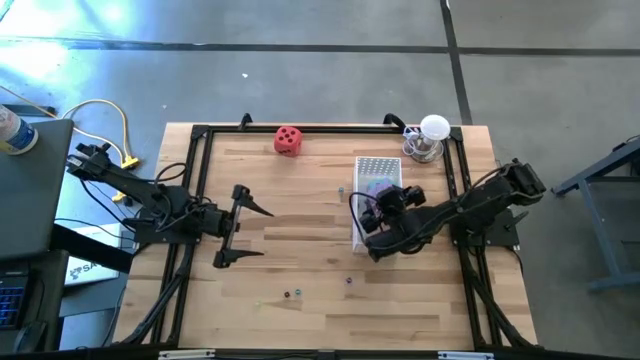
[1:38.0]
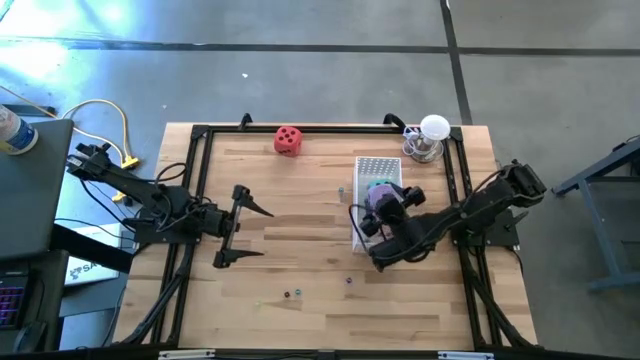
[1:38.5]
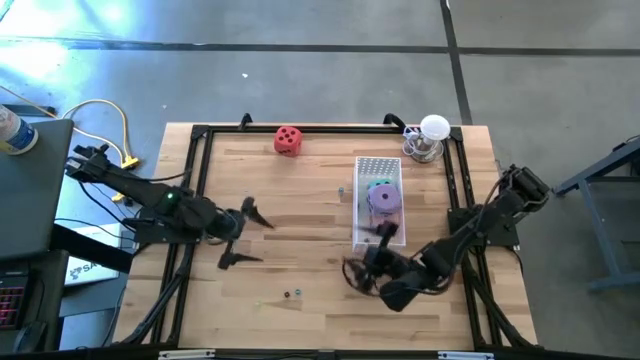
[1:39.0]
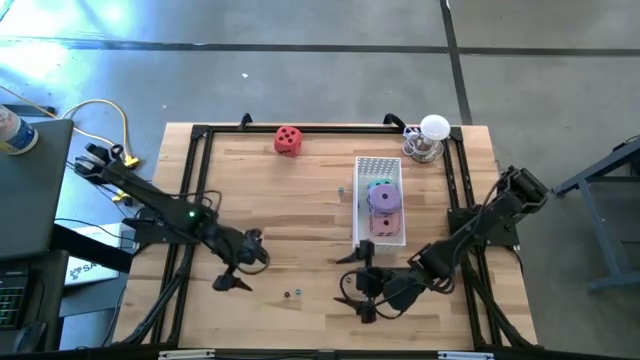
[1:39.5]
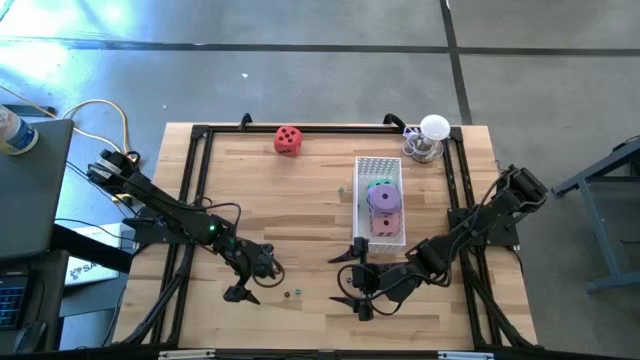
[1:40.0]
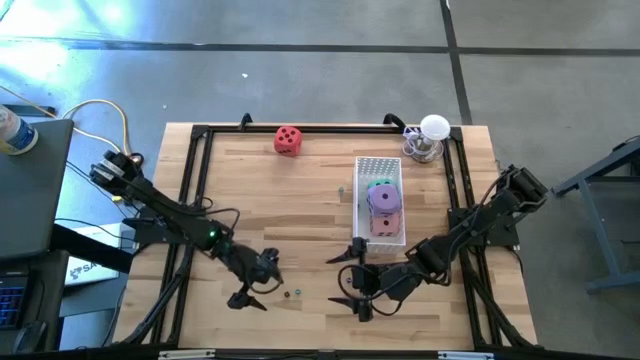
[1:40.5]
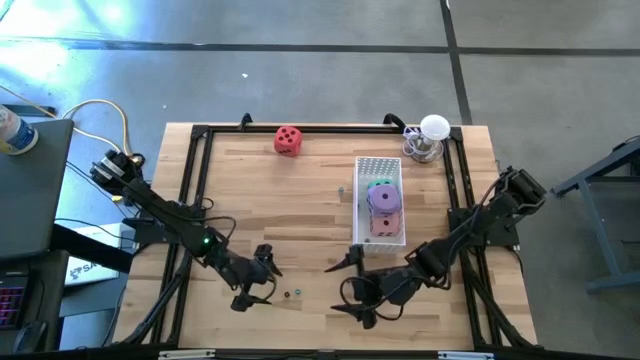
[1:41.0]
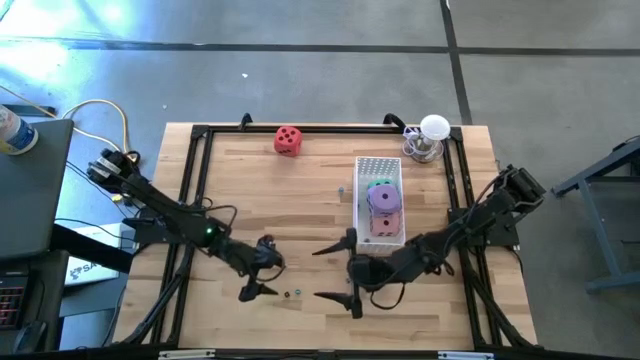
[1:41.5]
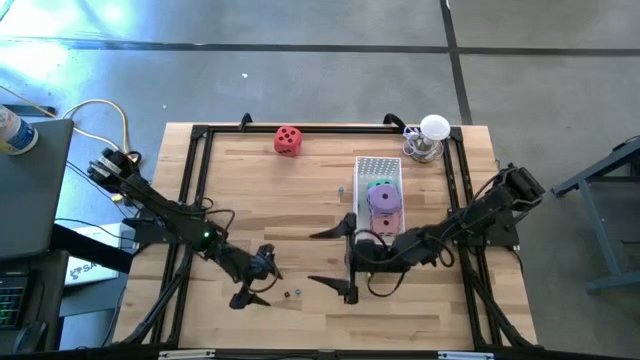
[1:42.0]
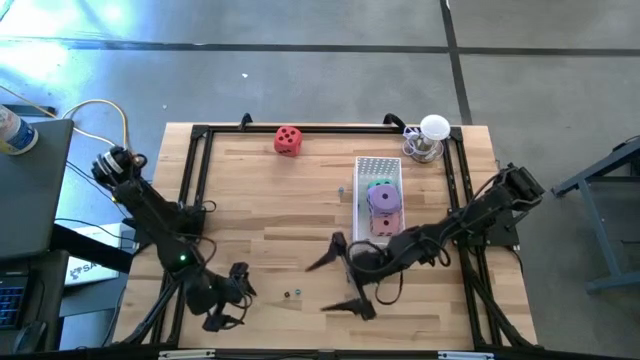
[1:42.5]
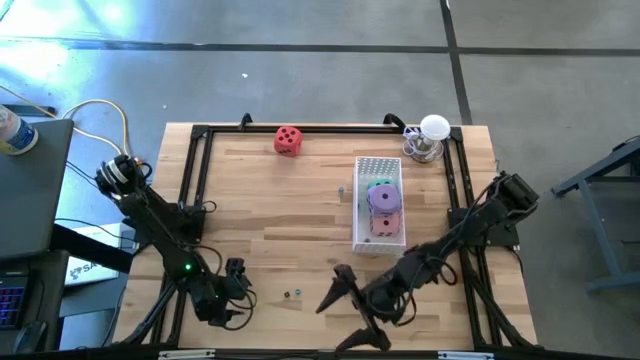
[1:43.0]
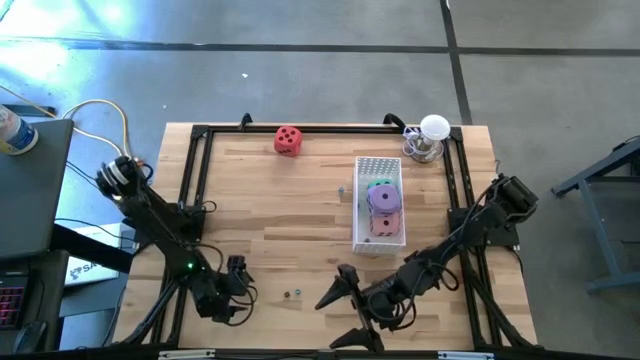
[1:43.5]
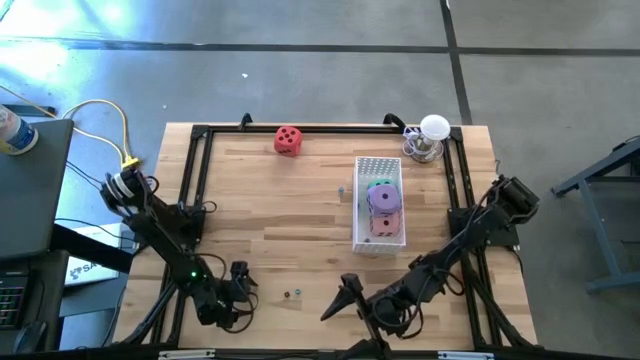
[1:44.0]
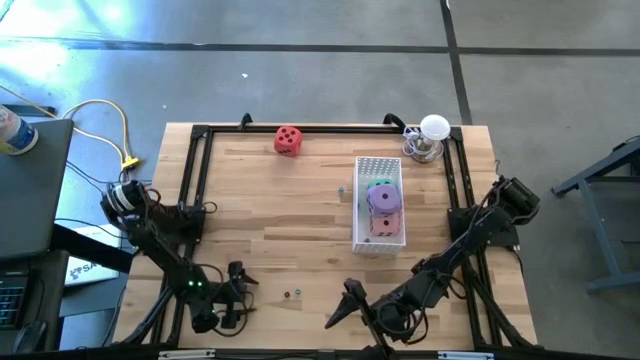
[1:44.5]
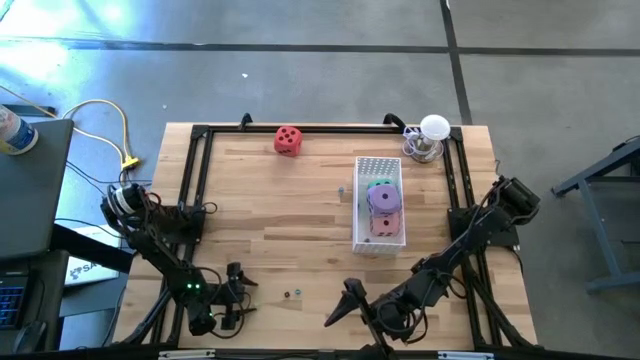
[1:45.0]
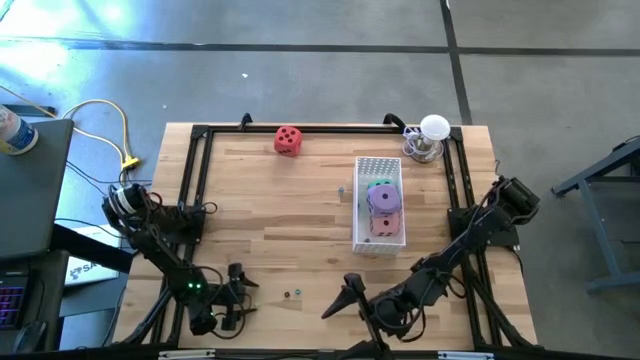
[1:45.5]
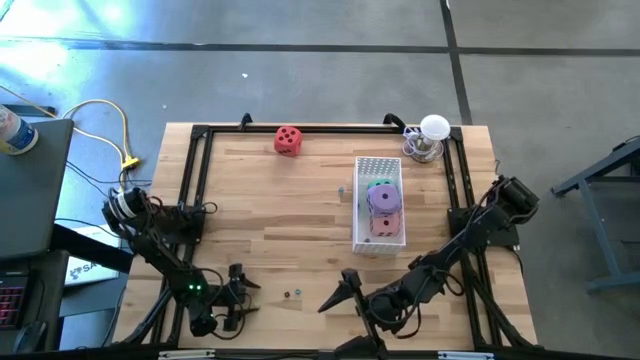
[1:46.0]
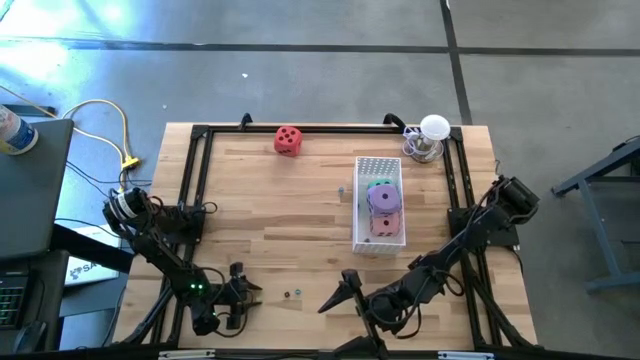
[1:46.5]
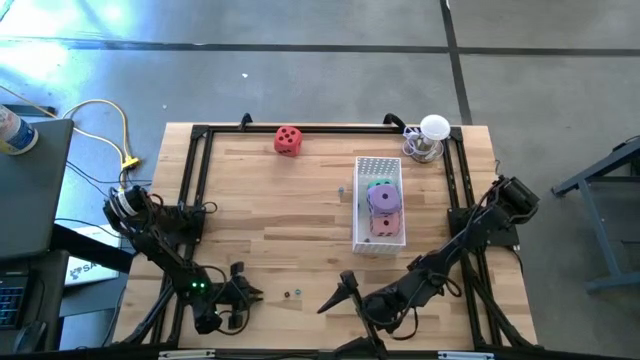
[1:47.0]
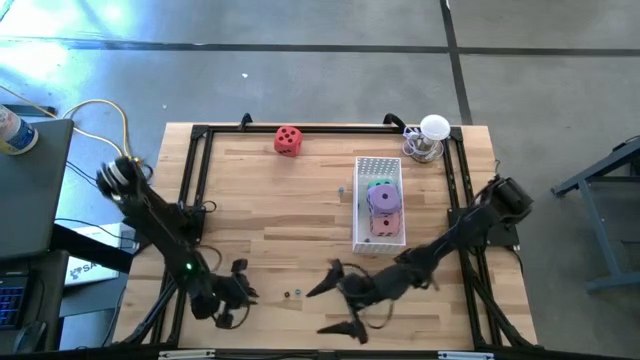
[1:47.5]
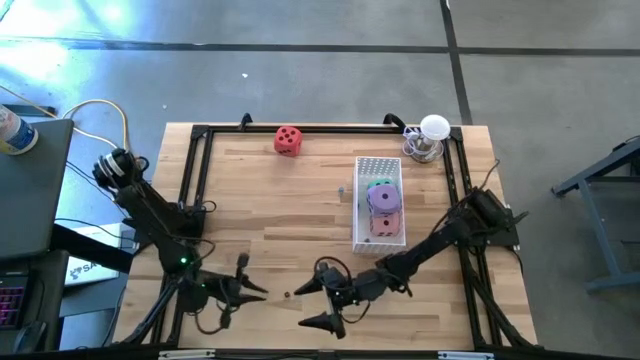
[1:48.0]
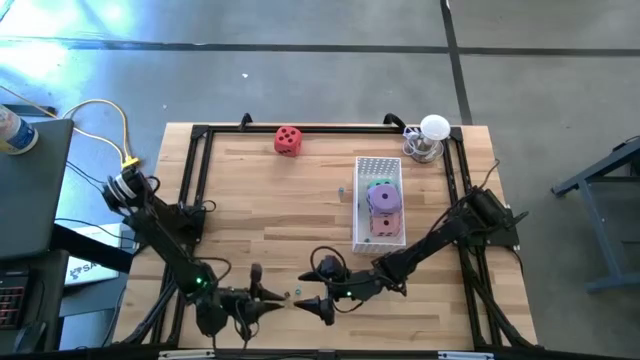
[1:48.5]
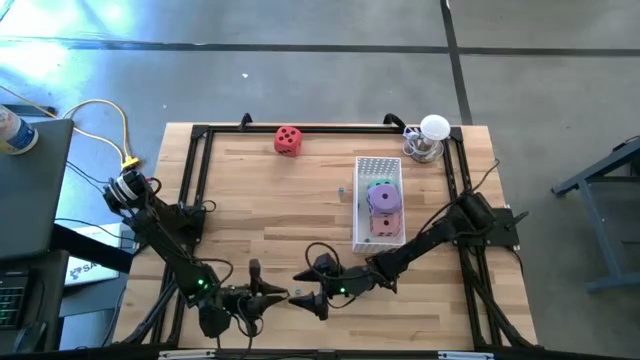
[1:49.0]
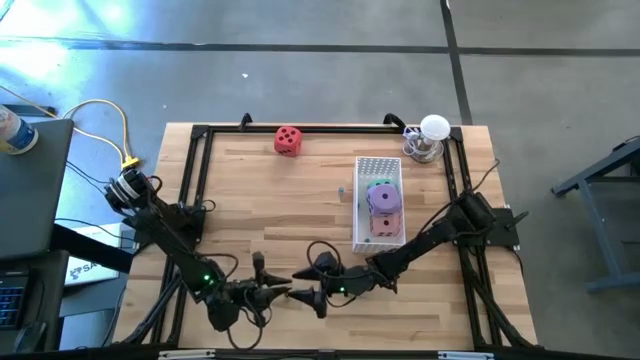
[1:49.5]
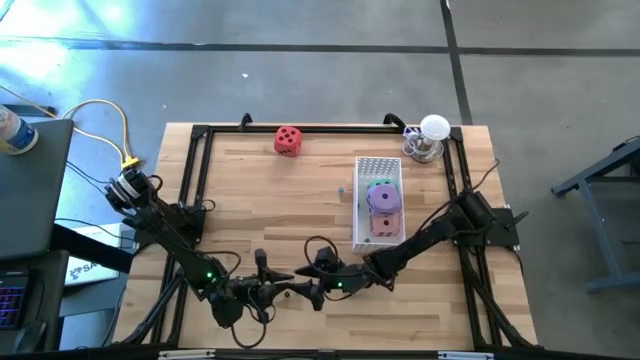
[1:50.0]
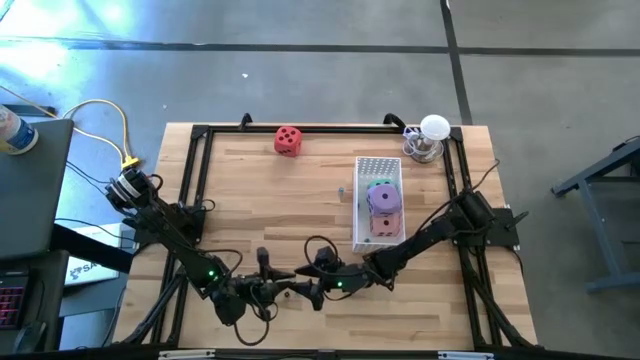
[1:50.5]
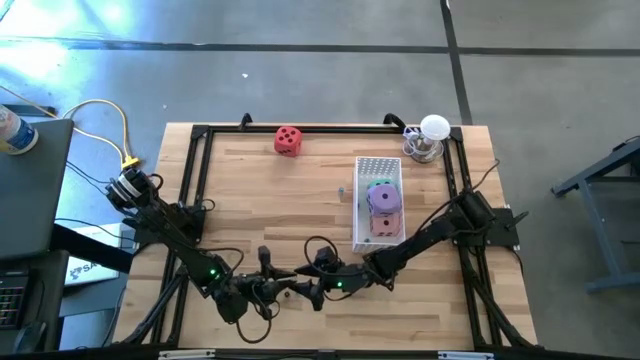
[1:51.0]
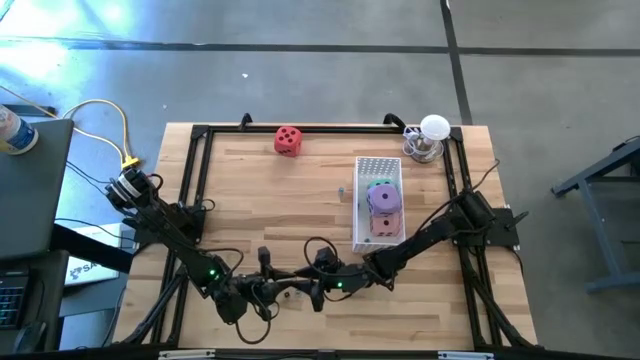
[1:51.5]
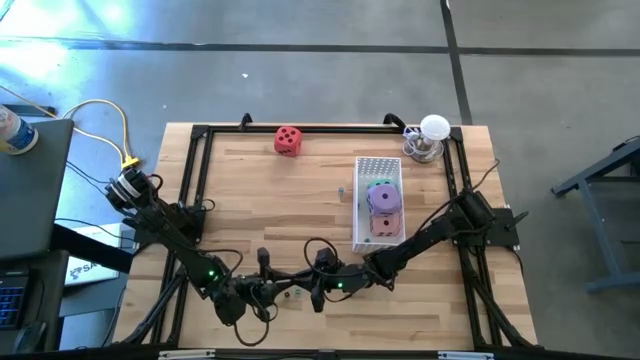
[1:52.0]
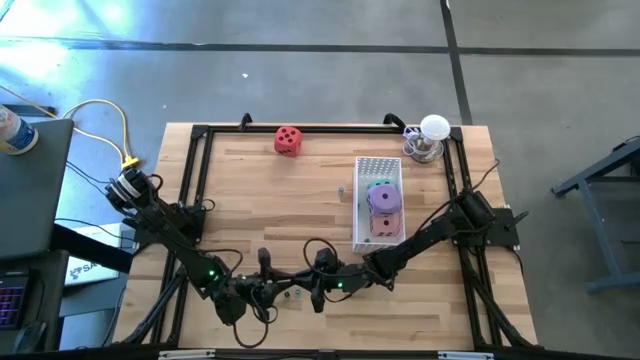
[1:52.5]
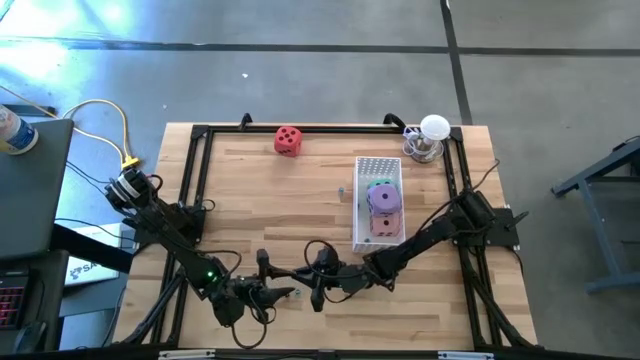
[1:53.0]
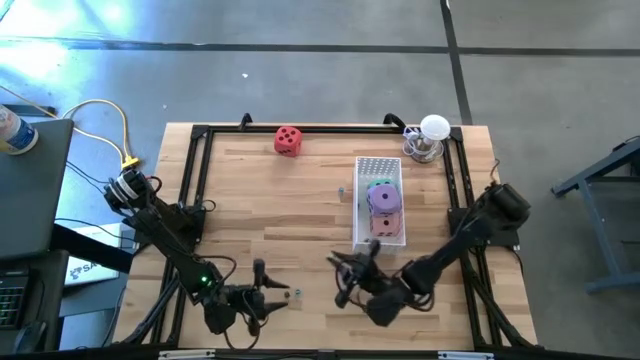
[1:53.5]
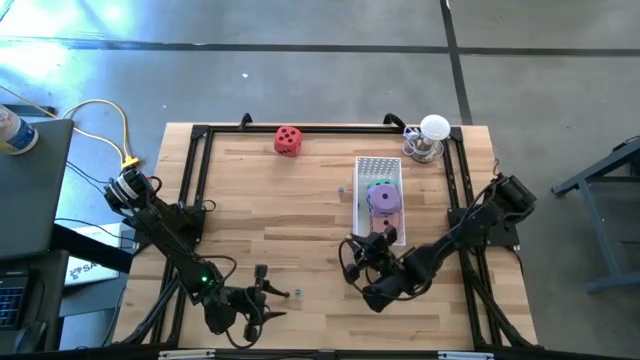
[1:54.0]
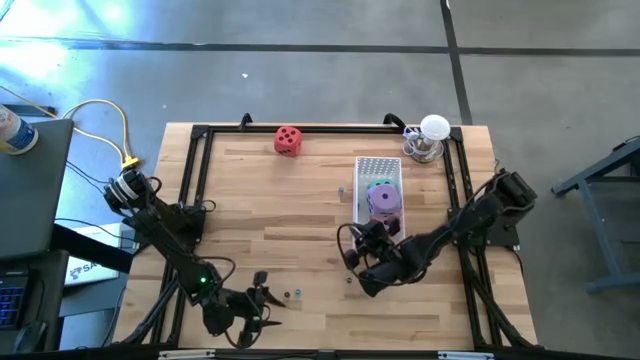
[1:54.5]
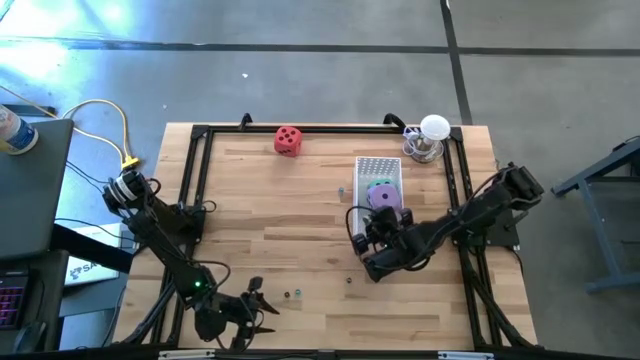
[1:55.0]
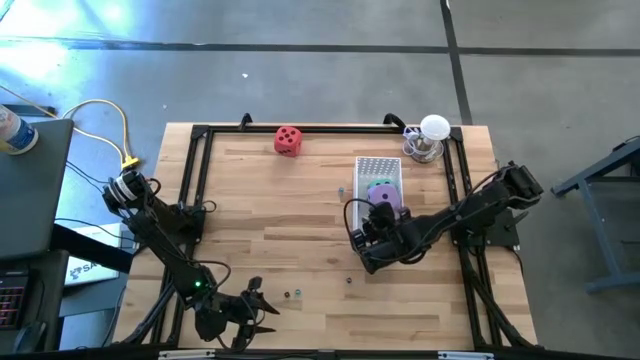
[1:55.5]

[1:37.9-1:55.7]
Task: Pick & Place Dice
Put the light green die into the white bin

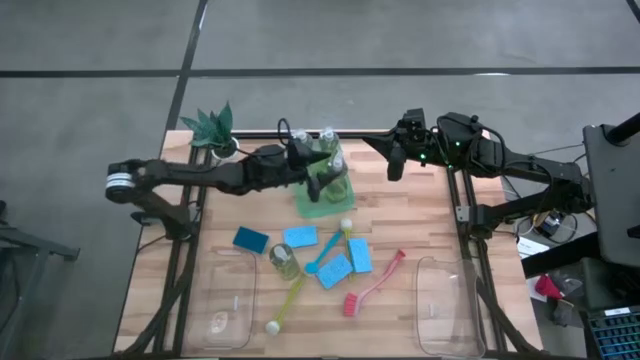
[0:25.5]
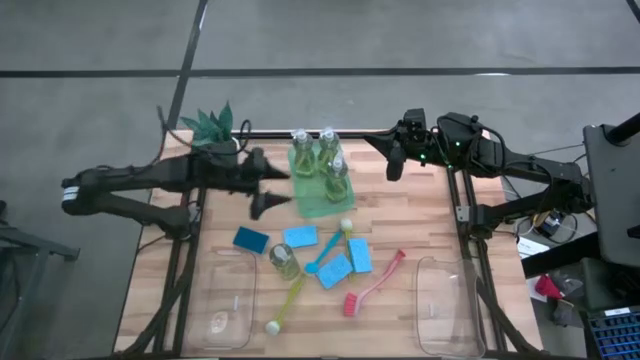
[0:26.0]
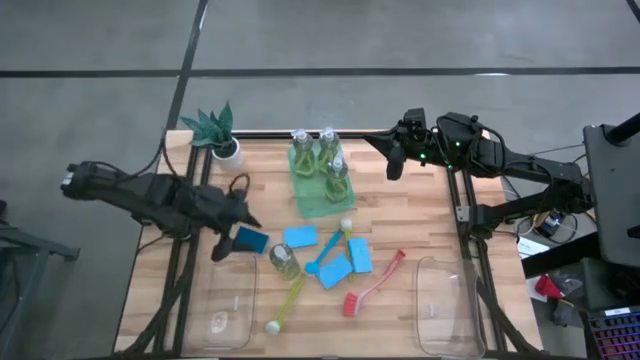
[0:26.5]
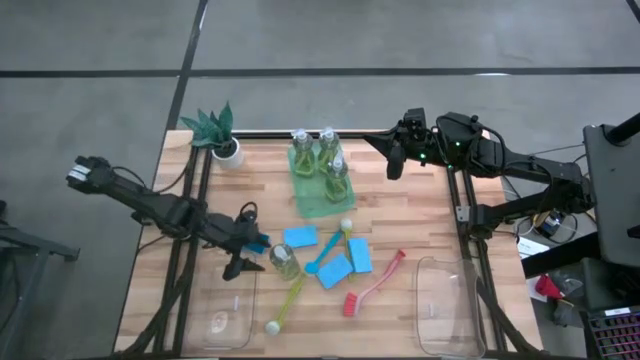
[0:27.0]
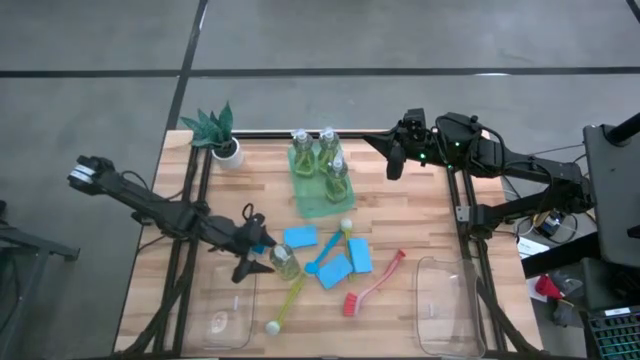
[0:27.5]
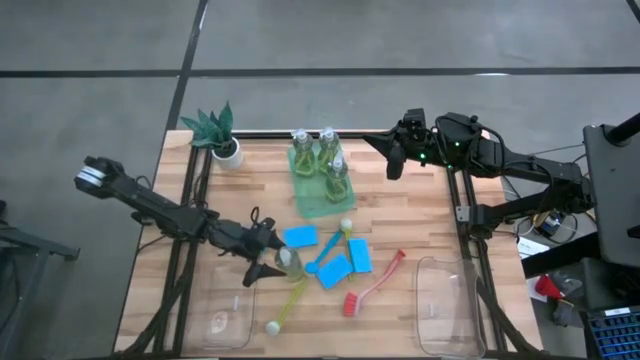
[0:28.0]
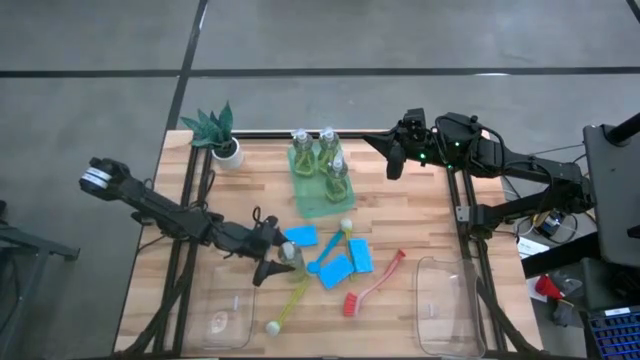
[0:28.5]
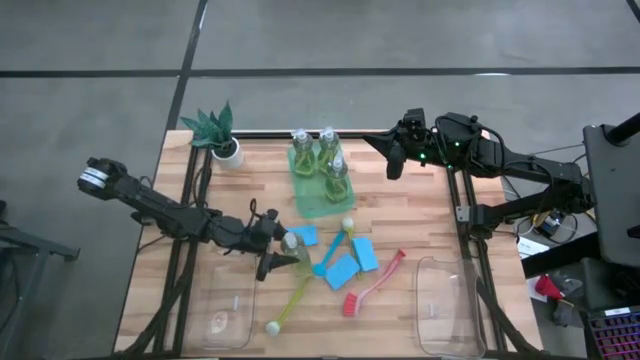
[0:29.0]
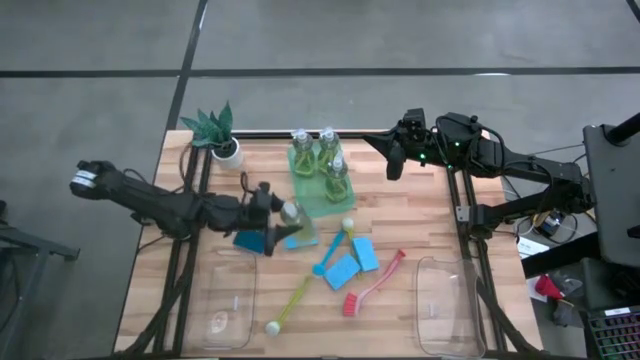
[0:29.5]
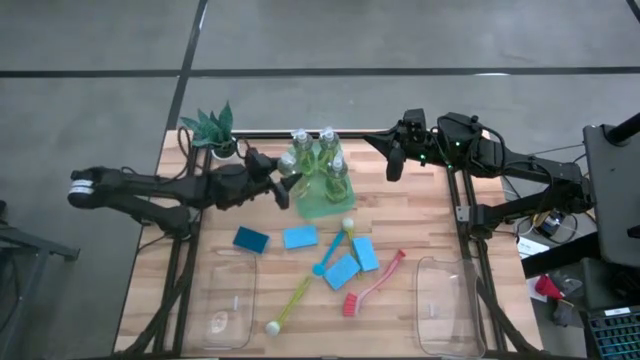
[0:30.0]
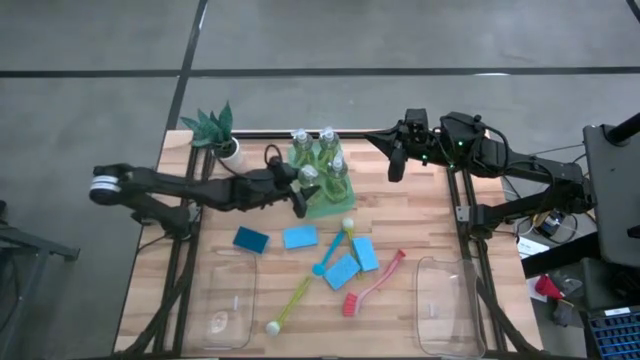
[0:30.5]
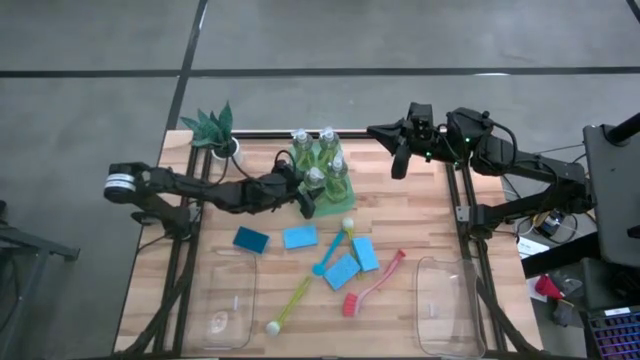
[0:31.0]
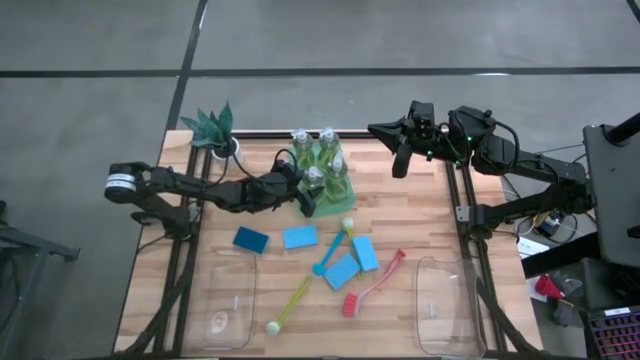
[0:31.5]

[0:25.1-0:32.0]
Task: Pick & Place Kitchen Sink Supplies
Put the green soap dispenser into the green bin
